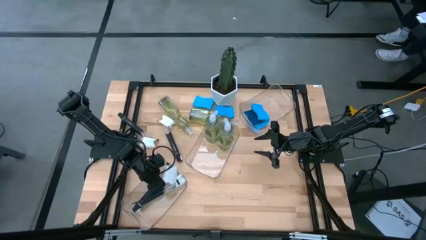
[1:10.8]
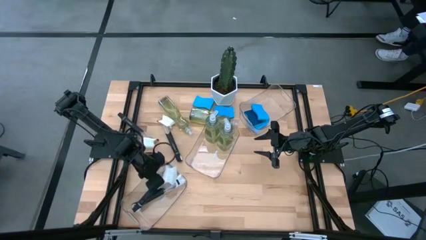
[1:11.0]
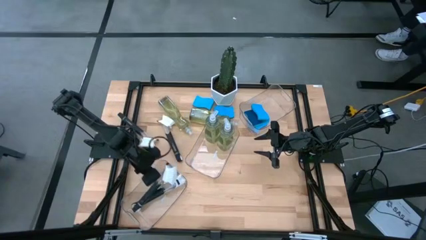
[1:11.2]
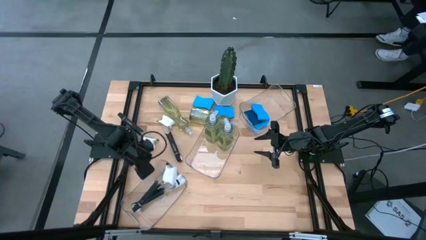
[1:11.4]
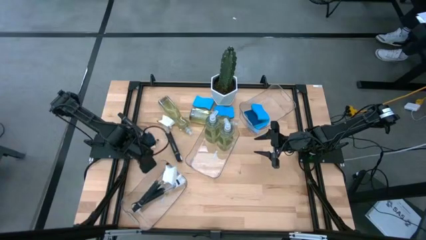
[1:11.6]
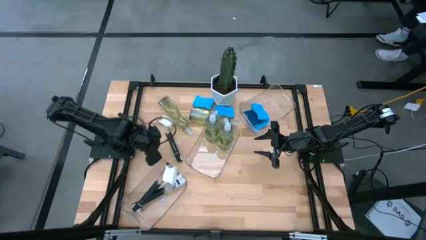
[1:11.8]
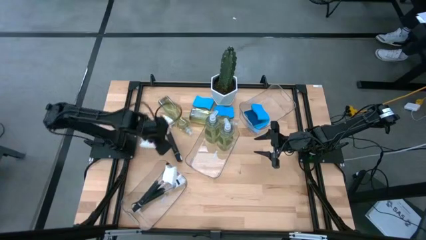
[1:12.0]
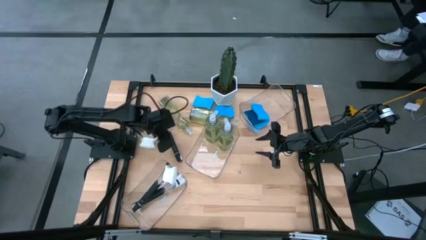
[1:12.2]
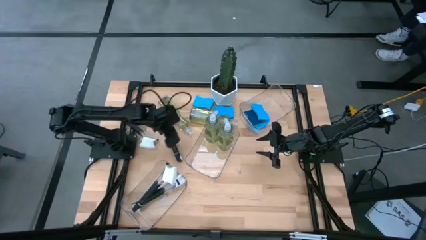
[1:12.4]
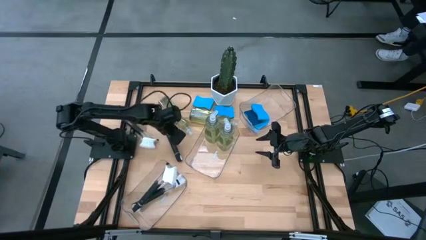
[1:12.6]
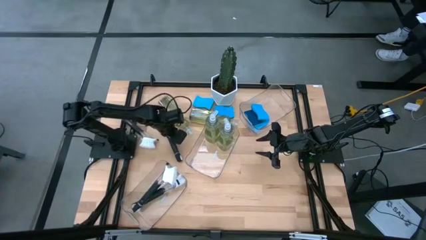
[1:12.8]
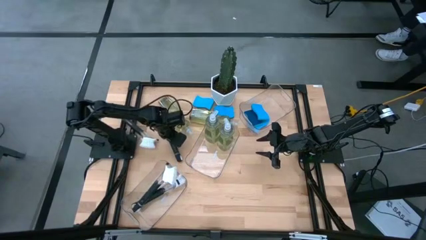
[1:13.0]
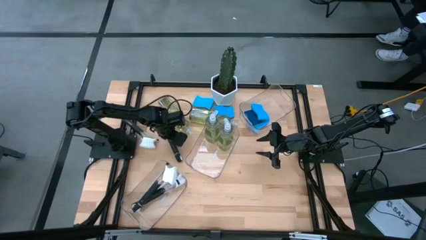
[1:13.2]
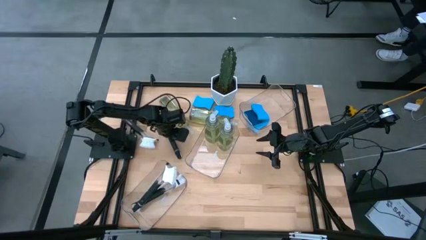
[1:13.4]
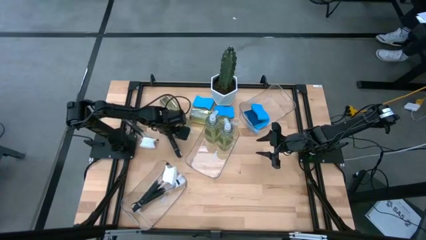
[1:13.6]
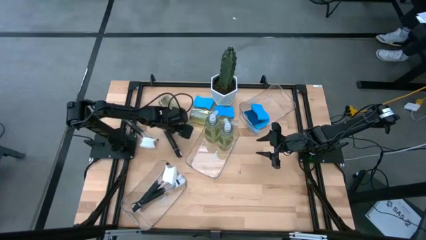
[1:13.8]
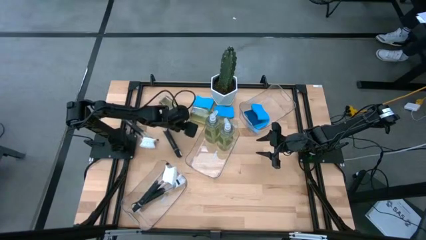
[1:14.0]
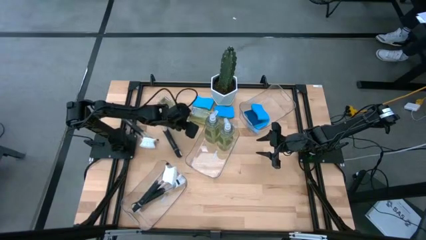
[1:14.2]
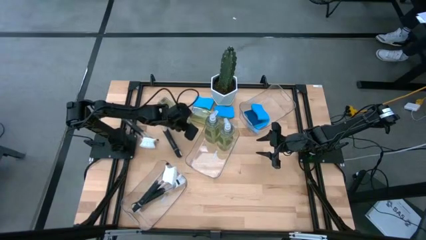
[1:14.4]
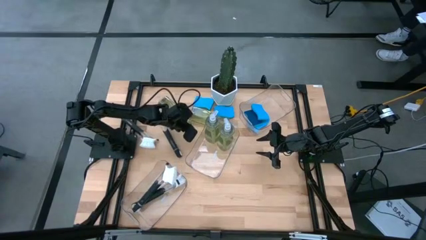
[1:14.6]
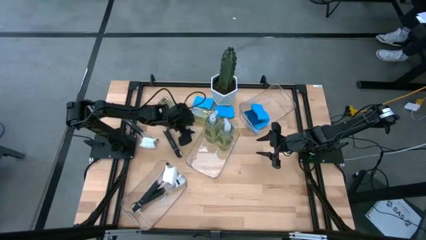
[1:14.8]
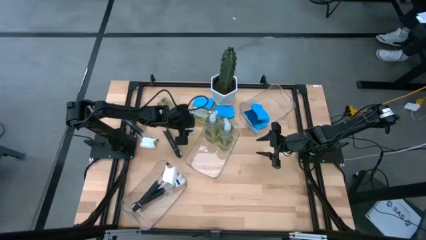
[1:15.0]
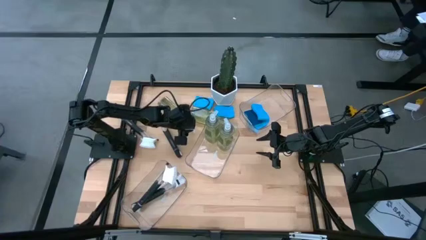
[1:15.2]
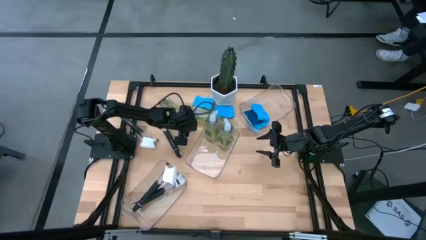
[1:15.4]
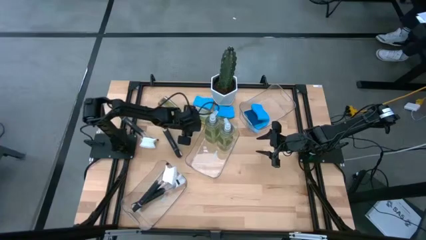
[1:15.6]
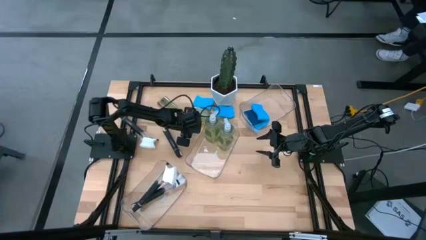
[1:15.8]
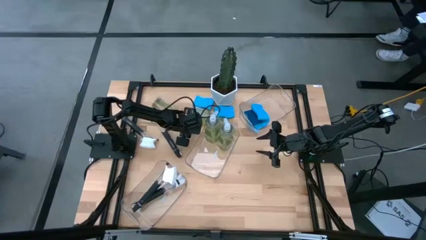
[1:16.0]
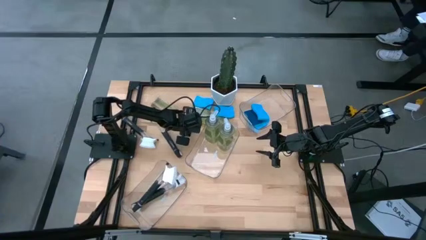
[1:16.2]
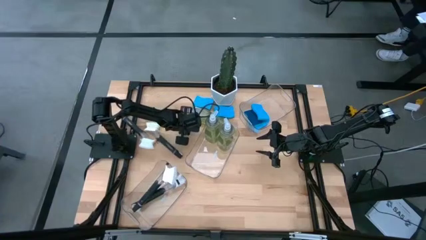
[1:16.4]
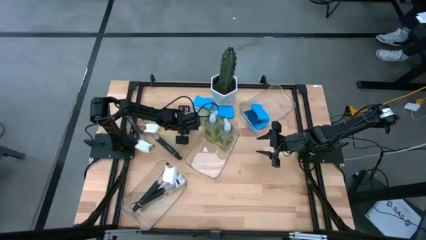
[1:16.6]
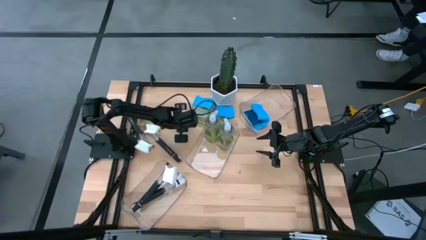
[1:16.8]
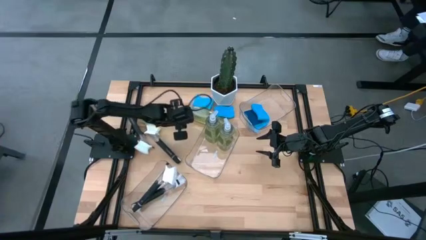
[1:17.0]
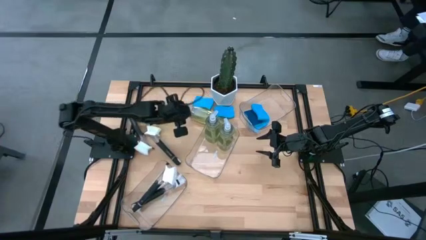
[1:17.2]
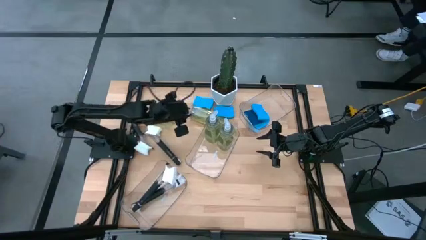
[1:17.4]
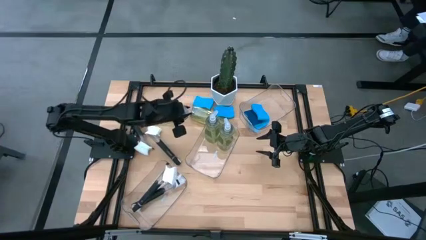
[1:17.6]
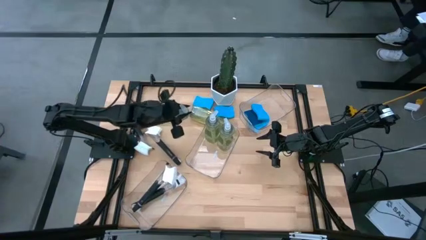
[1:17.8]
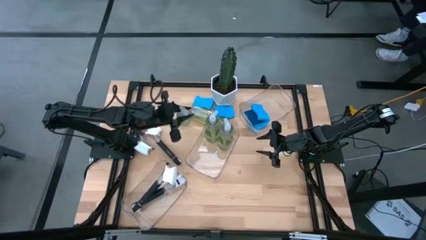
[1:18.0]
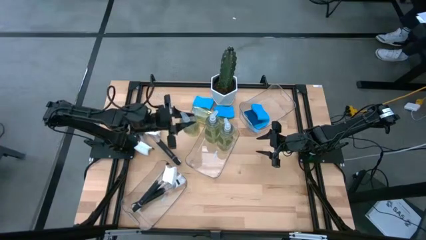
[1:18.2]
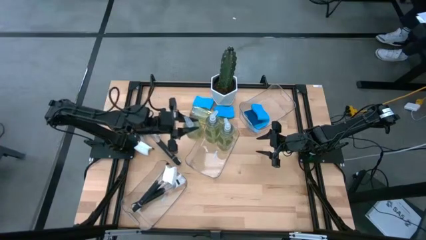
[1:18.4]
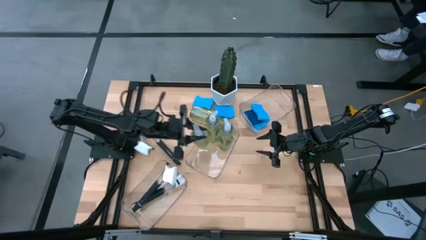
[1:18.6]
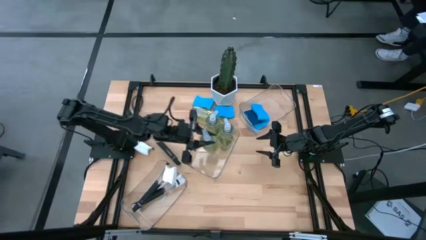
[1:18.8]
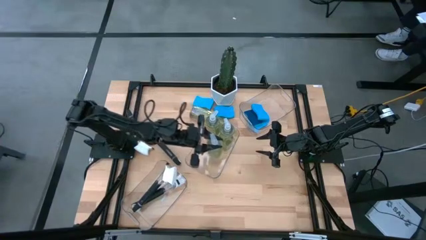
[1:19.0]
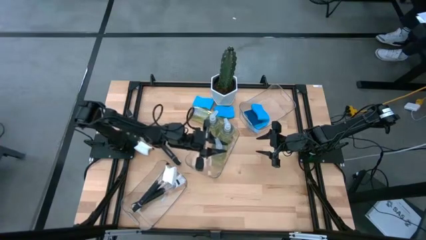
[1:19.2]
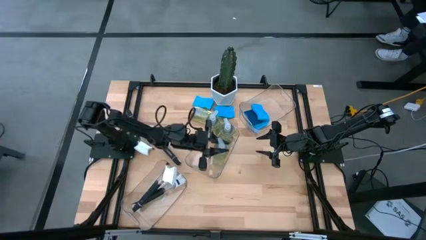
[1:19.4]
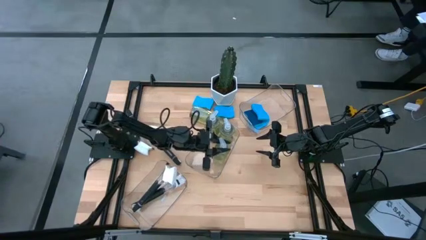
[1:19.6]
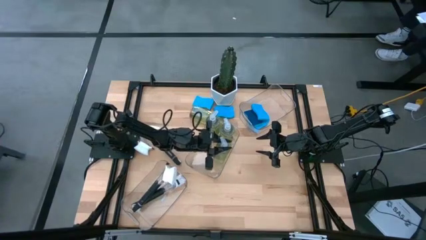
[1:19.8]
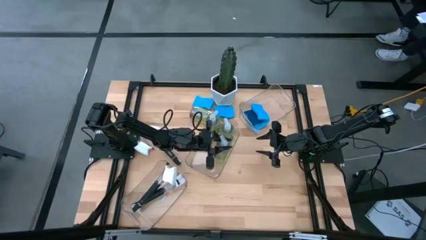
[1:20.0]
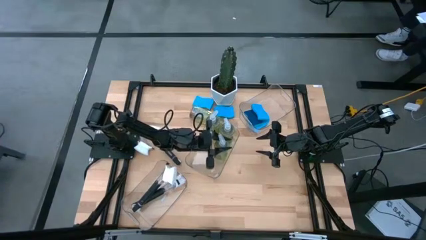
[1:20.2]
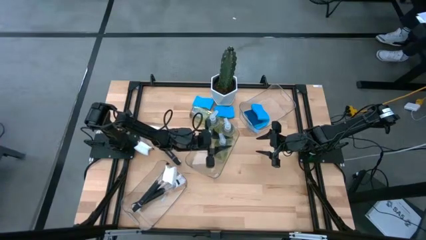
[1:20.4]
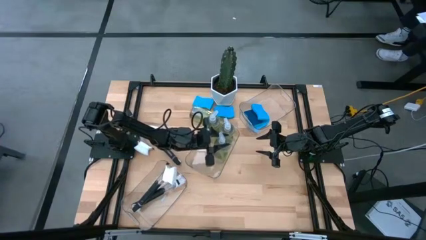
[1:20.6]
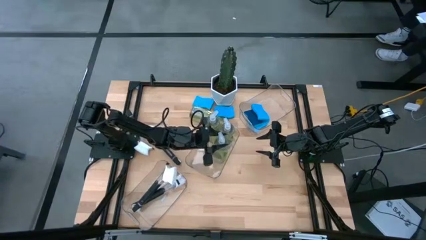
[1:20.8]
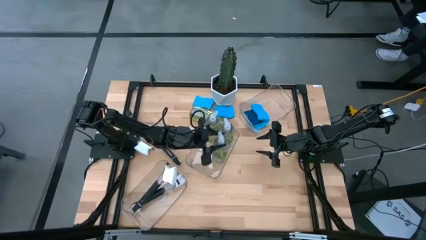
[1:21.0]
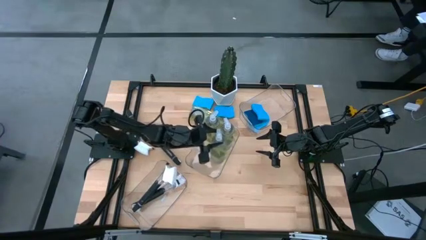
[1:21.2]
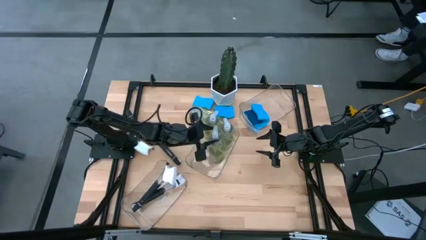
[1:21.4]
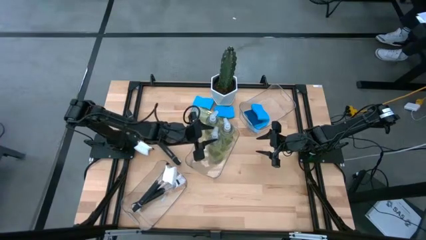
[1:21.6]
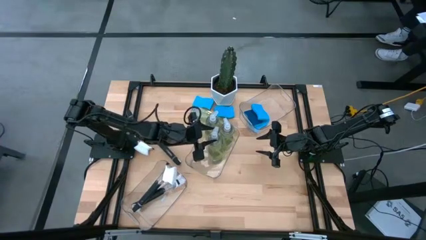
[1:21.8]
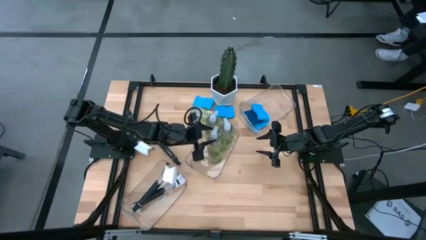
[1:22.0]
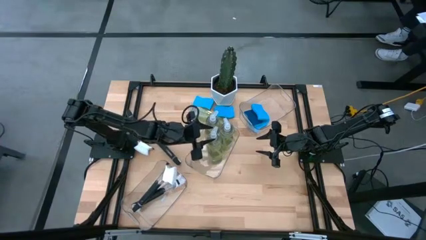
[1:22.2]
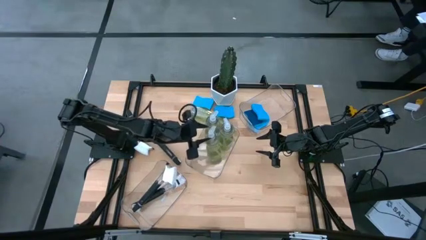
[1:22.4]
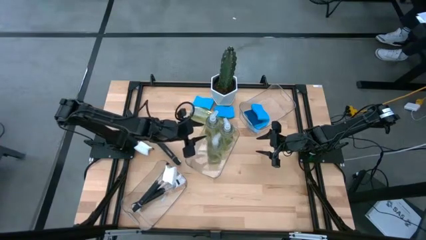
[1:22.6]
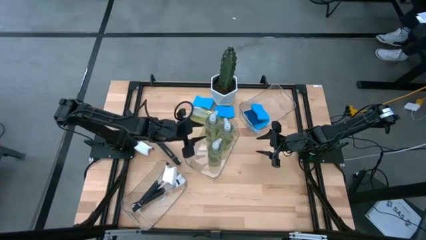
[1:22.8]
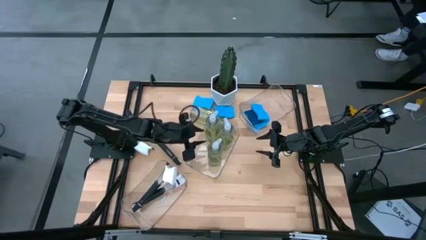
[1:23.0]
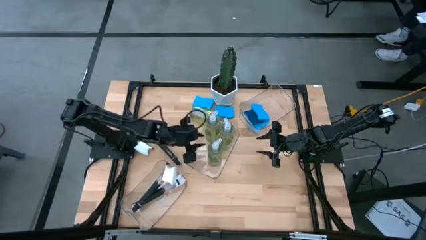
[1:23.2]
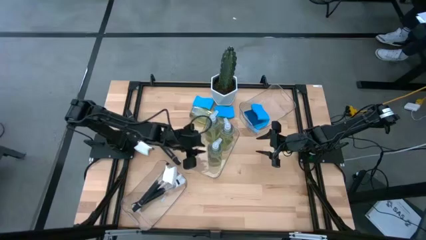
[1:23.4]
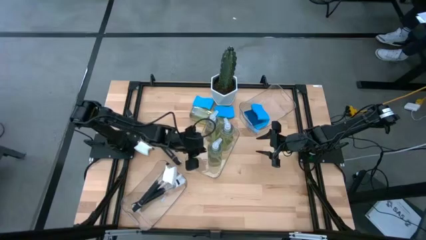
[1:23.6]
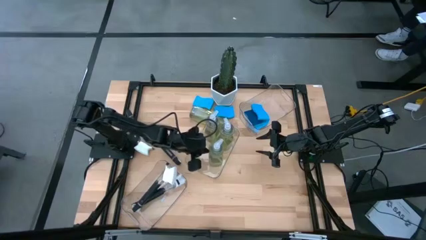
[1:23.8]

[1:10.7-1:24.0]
Task: Pick & Place Kitchen Sink Supplies
Put the green soap dispenser into the middle transparent bin

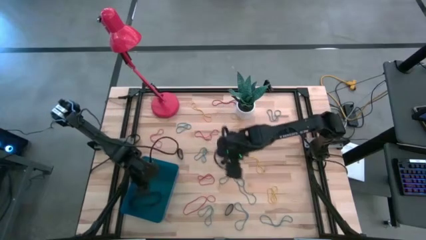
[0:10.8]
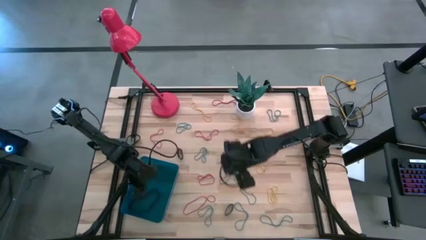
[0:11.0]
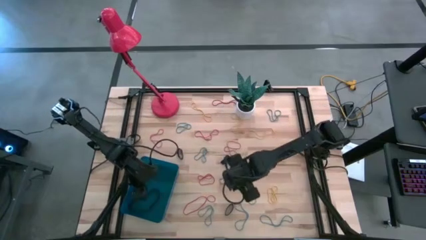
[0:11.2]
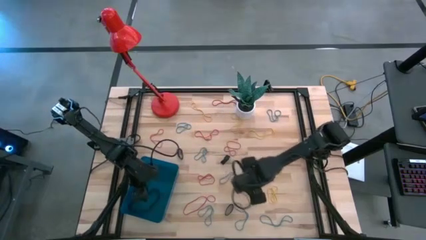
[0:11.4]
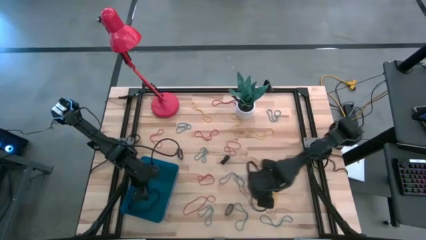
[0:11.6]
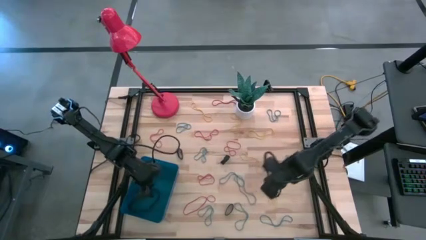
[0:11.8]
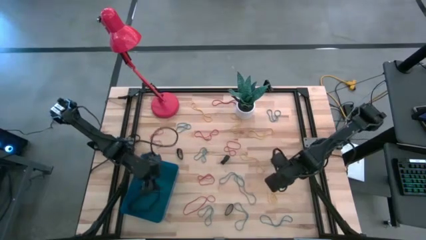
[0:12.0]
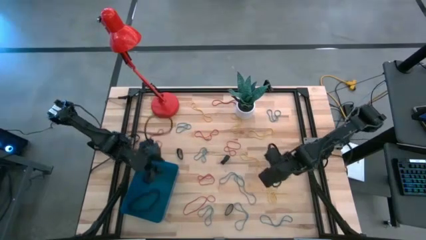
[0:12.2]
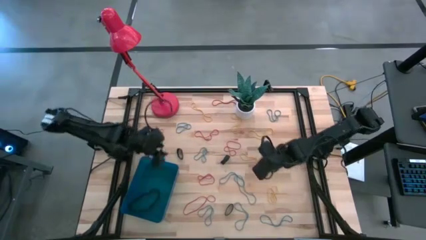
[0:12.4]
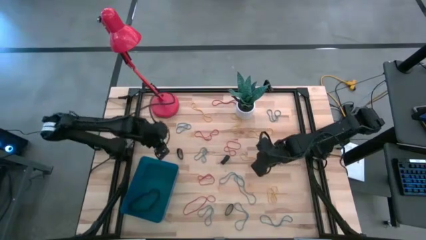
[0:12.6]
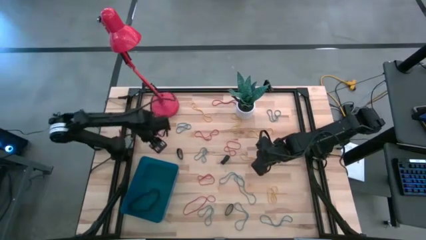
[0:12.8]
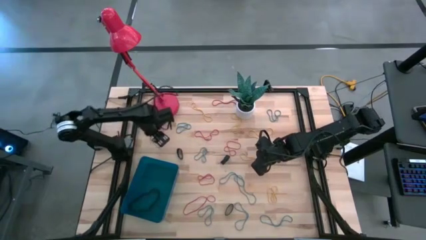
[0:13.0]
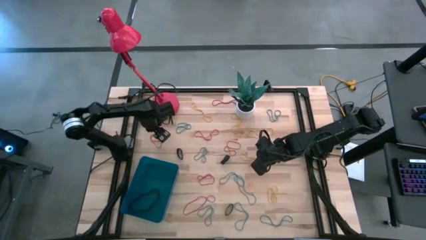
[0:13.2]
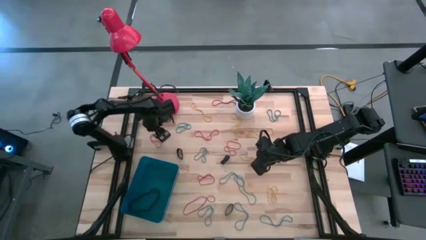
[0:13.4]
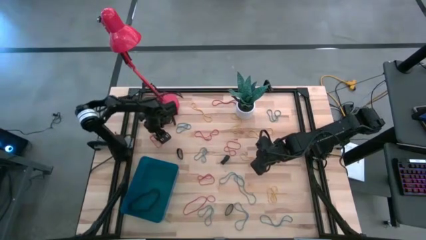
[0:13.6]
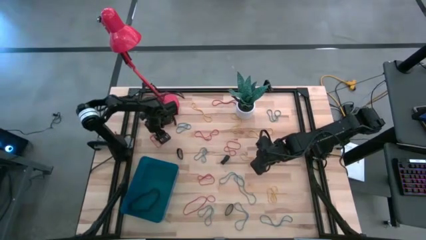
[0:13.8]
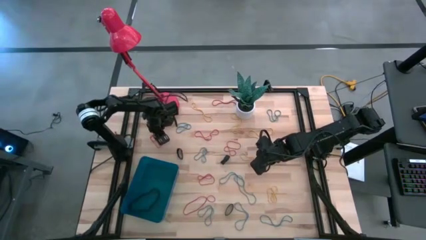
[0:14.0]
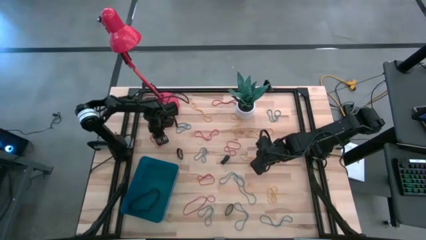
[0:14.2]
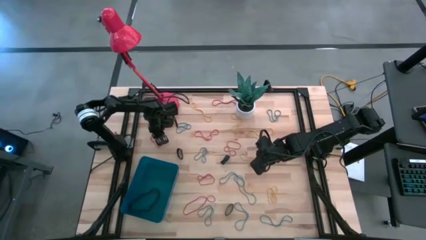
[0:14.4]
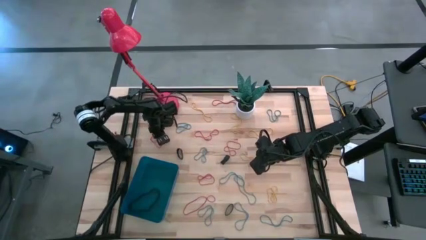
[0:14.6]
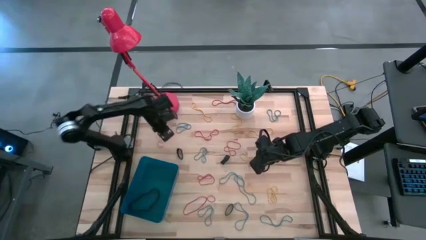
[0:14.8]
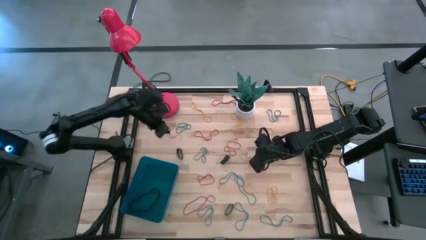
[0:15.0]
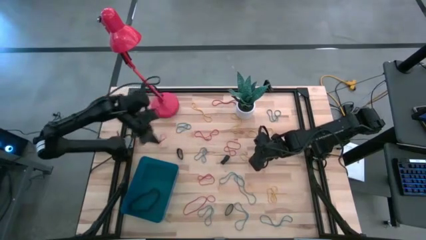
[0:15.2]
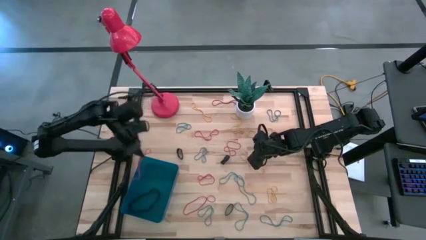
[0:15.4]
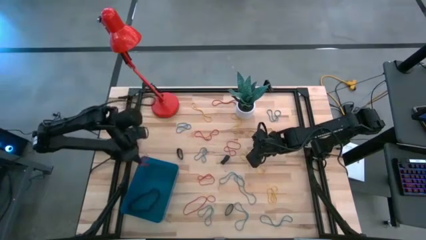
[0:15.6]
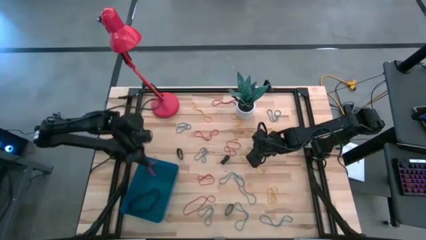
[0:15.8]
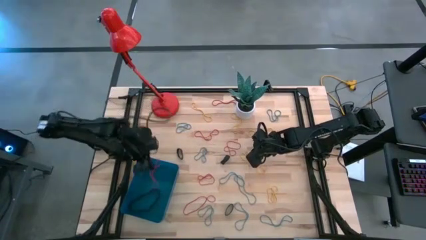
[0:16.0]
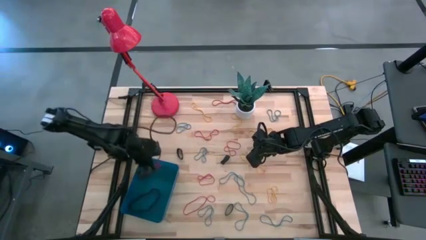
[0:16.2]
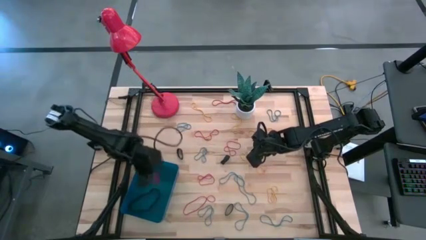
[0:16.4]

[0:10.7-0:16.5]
Task: Pick and place rubber bands into bin
Put the red rubber band into the blue bin
